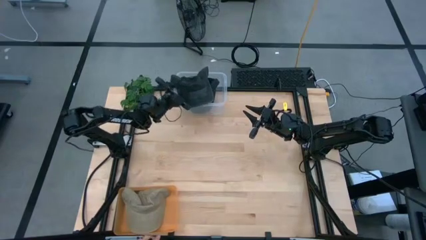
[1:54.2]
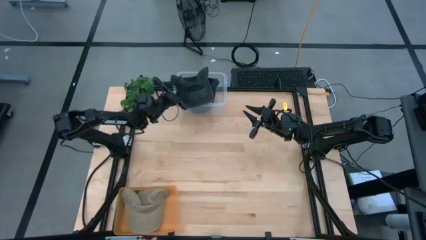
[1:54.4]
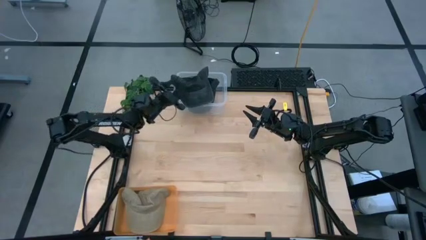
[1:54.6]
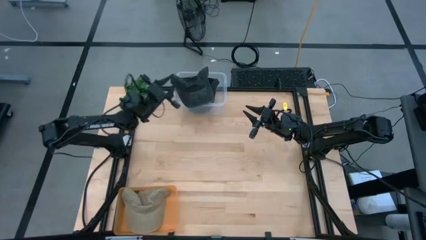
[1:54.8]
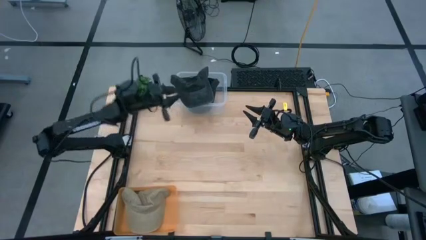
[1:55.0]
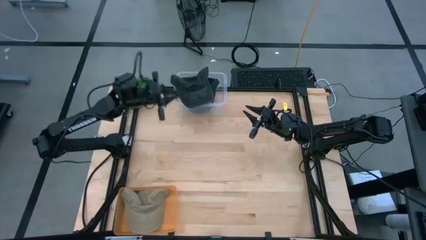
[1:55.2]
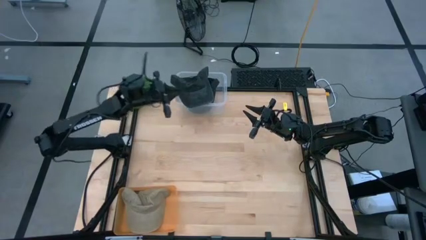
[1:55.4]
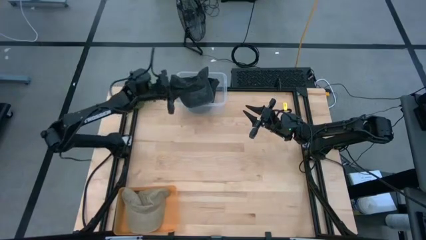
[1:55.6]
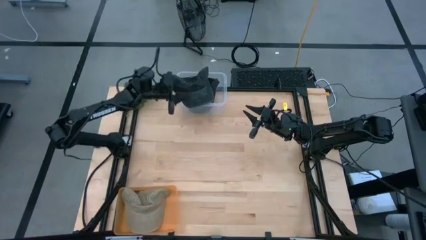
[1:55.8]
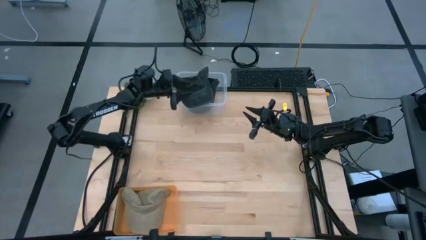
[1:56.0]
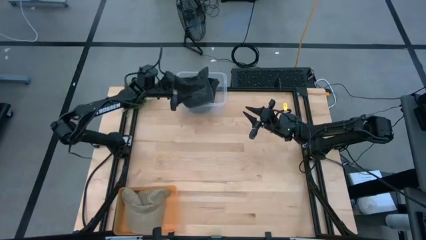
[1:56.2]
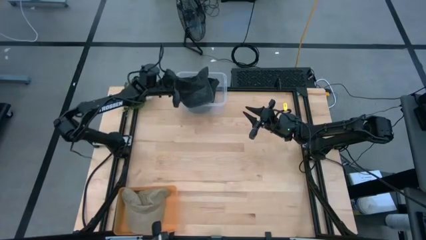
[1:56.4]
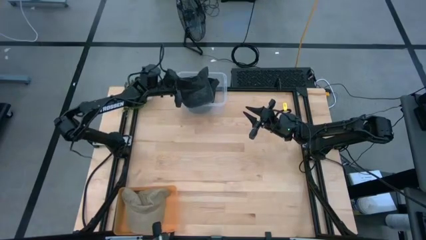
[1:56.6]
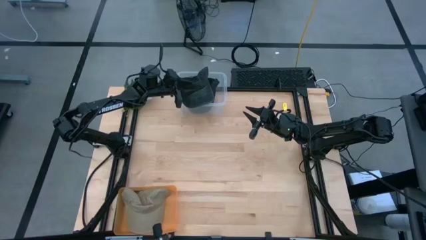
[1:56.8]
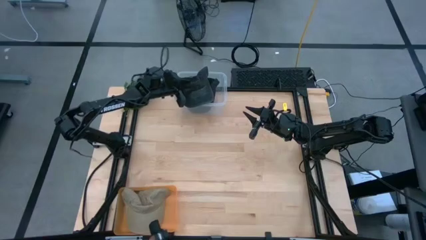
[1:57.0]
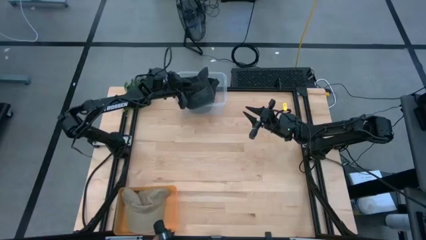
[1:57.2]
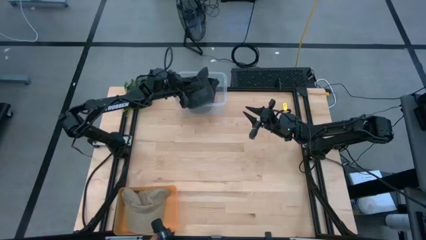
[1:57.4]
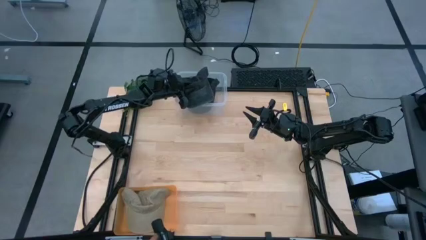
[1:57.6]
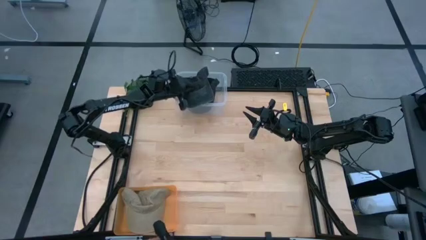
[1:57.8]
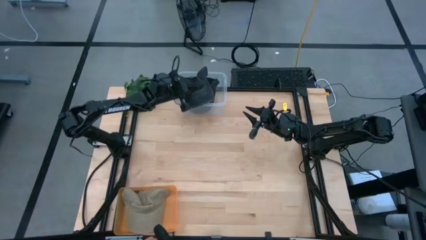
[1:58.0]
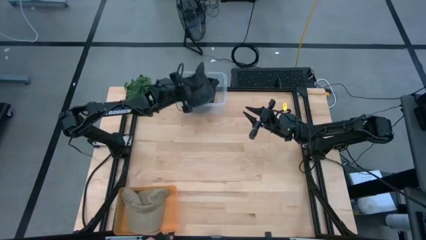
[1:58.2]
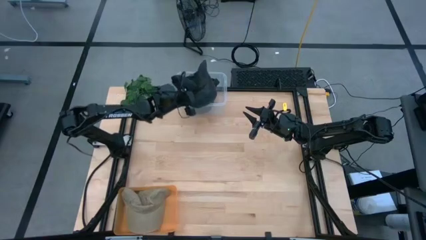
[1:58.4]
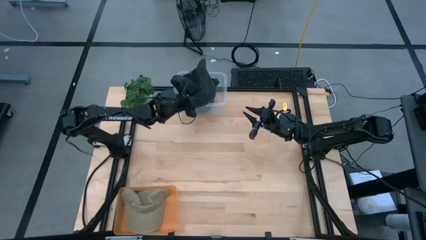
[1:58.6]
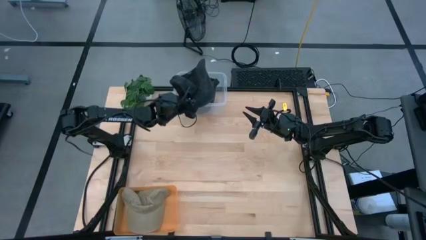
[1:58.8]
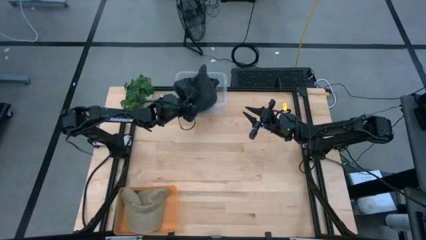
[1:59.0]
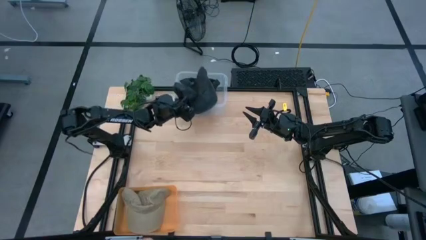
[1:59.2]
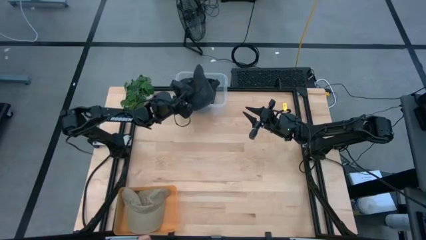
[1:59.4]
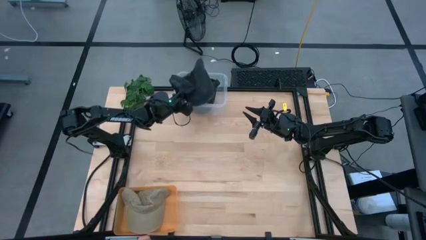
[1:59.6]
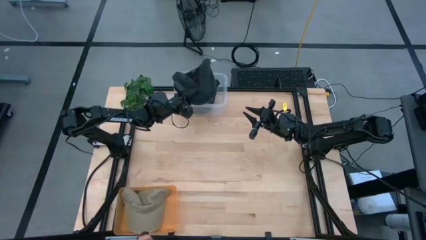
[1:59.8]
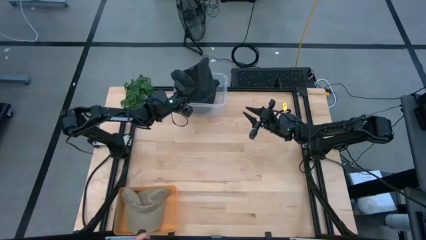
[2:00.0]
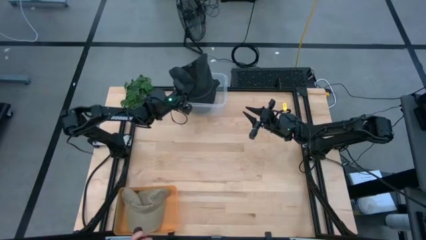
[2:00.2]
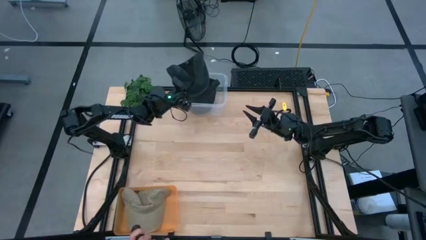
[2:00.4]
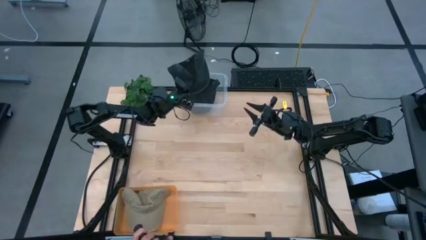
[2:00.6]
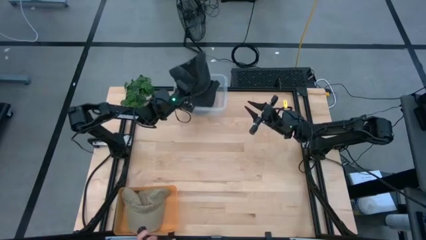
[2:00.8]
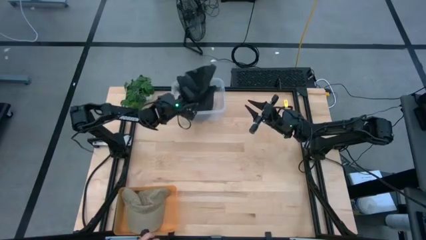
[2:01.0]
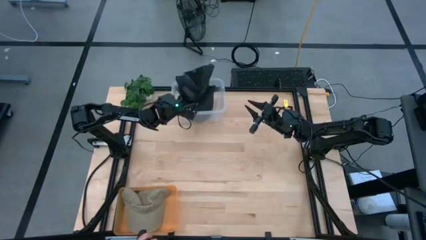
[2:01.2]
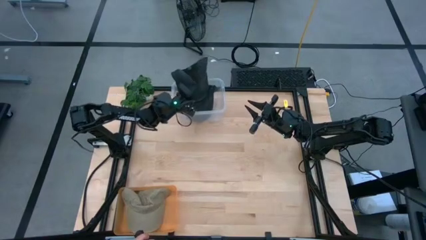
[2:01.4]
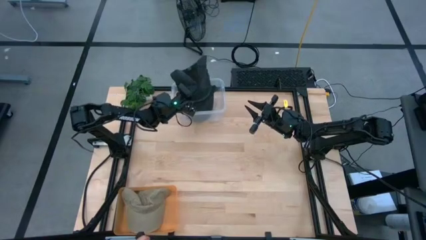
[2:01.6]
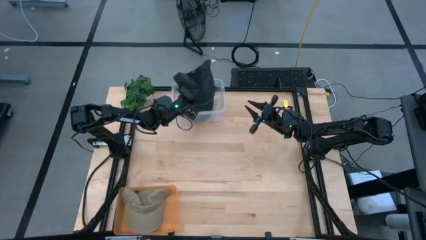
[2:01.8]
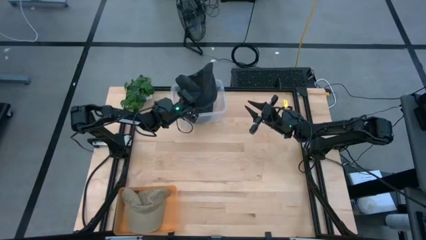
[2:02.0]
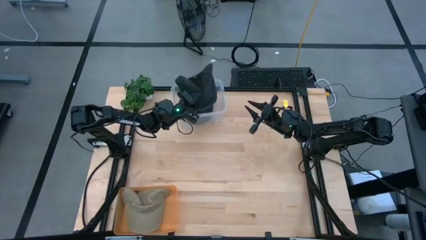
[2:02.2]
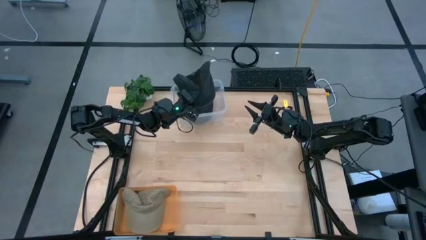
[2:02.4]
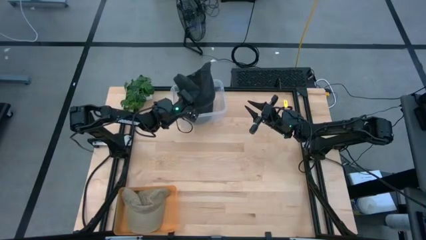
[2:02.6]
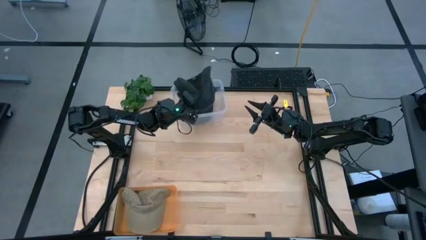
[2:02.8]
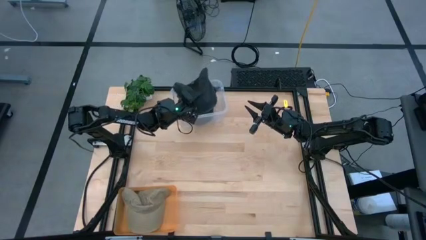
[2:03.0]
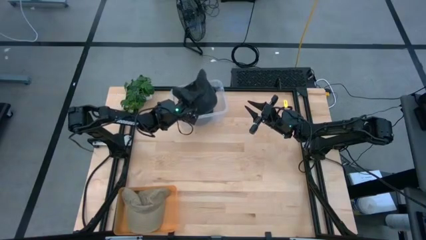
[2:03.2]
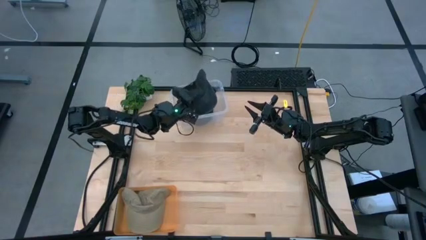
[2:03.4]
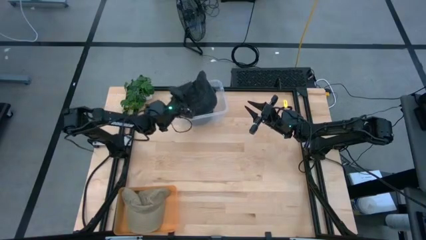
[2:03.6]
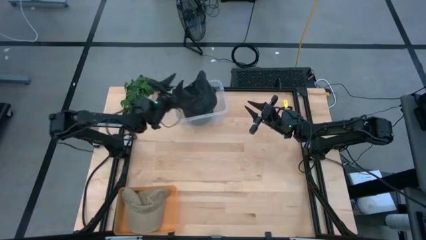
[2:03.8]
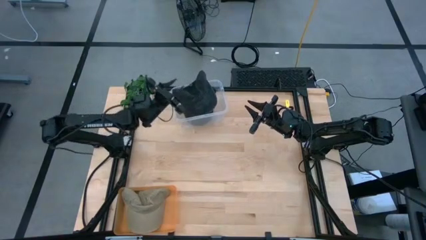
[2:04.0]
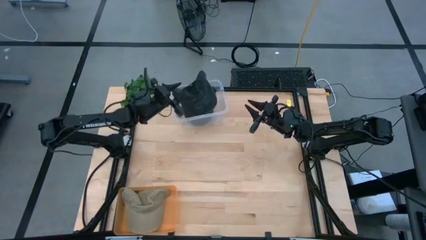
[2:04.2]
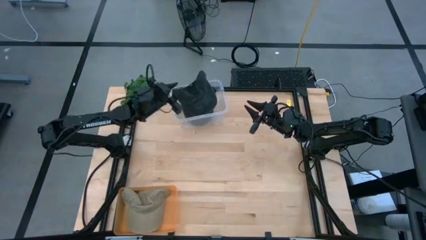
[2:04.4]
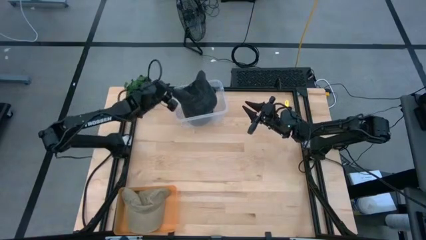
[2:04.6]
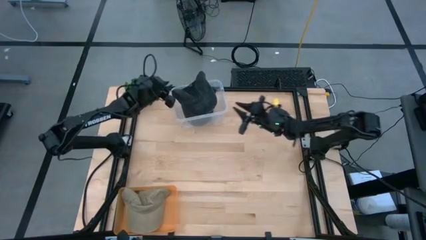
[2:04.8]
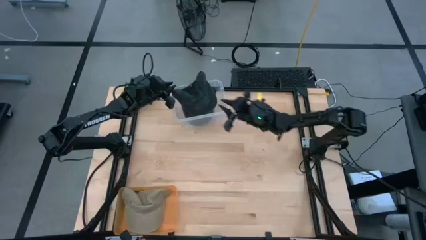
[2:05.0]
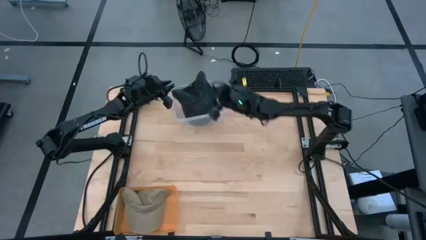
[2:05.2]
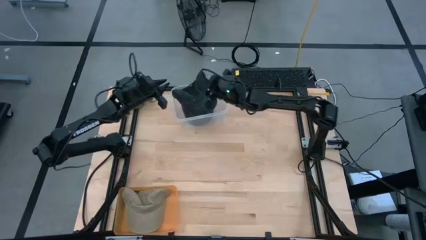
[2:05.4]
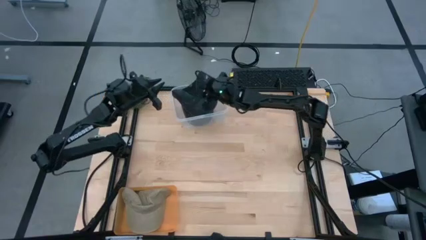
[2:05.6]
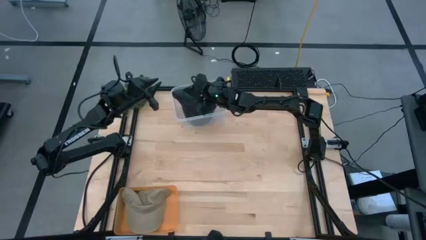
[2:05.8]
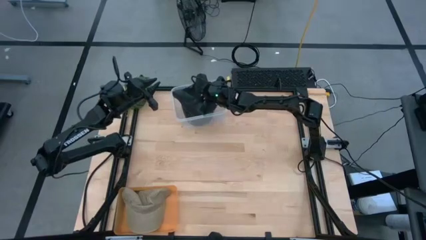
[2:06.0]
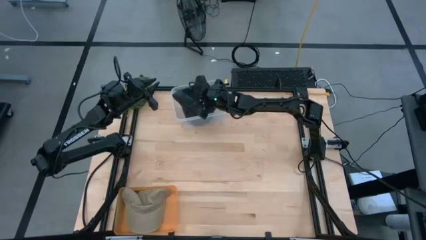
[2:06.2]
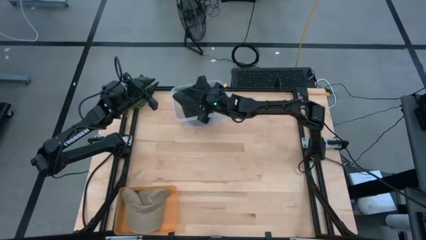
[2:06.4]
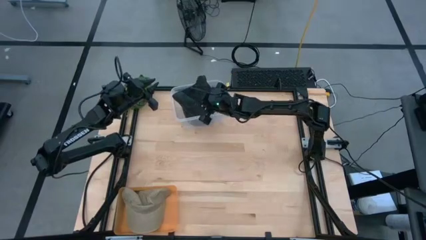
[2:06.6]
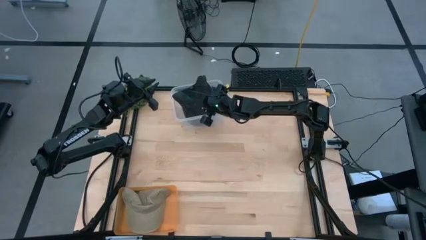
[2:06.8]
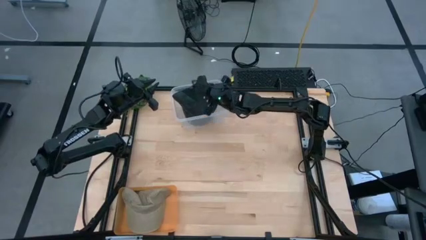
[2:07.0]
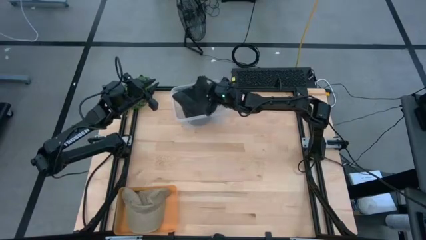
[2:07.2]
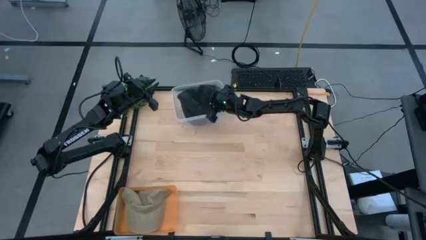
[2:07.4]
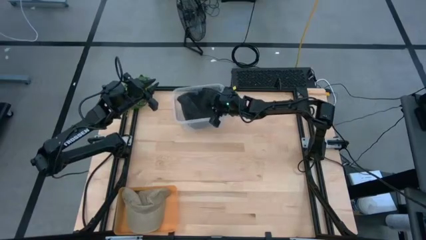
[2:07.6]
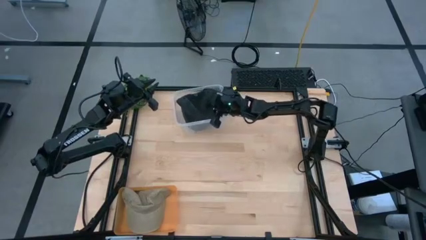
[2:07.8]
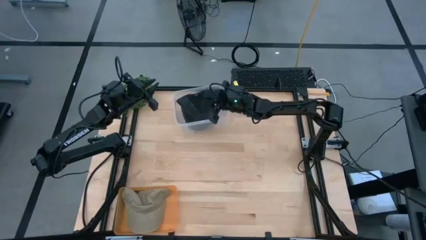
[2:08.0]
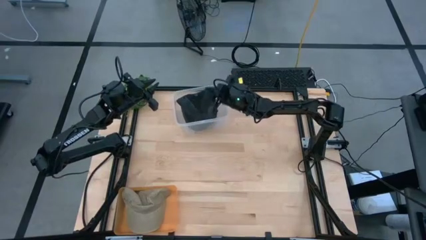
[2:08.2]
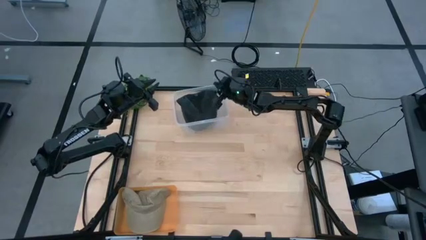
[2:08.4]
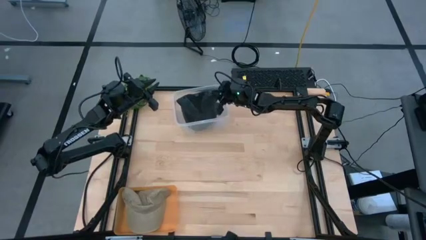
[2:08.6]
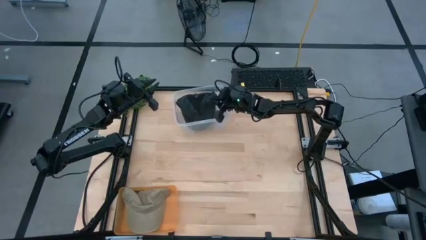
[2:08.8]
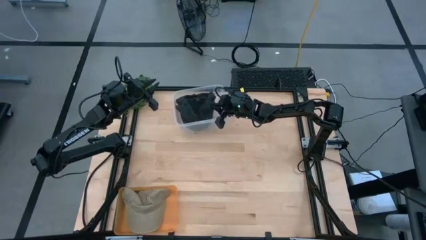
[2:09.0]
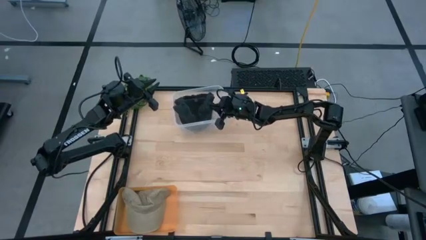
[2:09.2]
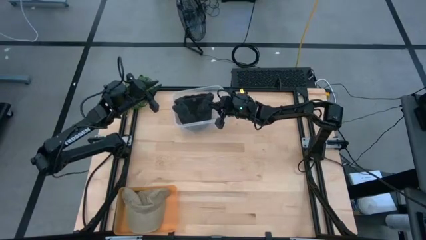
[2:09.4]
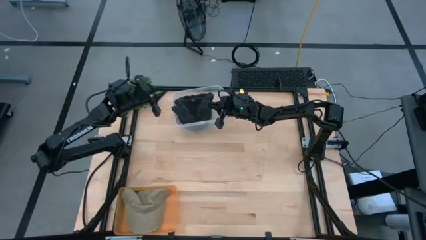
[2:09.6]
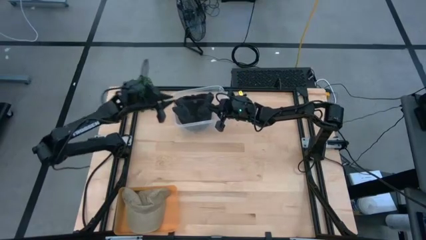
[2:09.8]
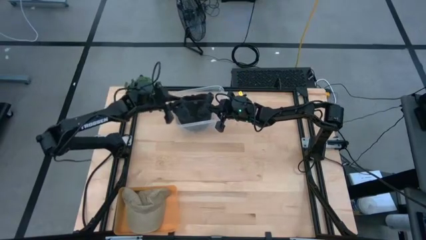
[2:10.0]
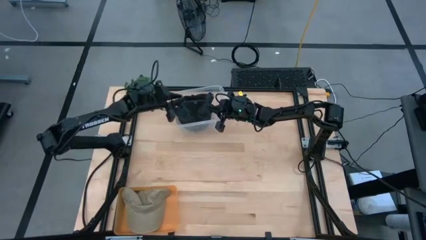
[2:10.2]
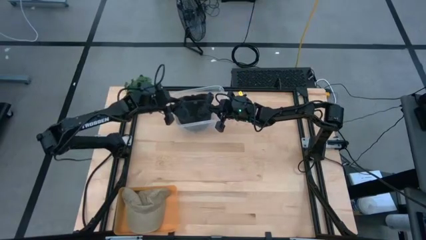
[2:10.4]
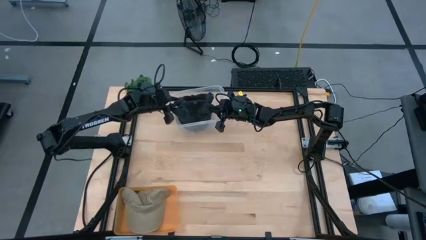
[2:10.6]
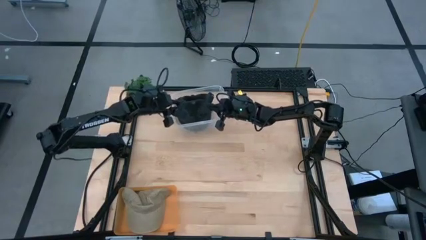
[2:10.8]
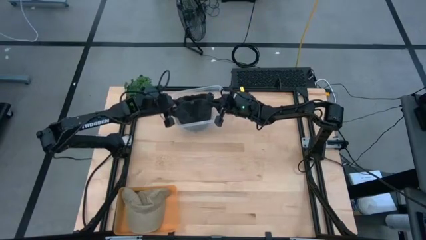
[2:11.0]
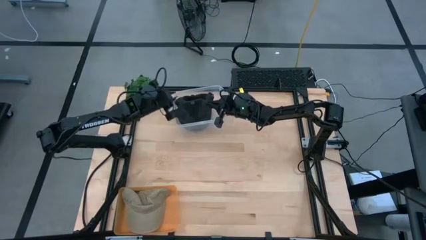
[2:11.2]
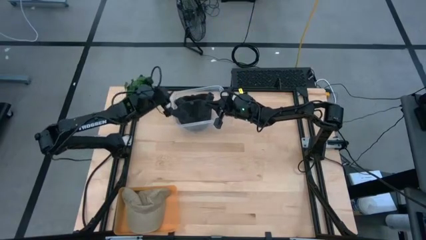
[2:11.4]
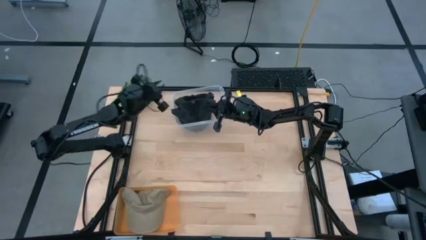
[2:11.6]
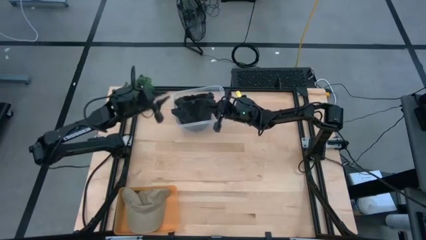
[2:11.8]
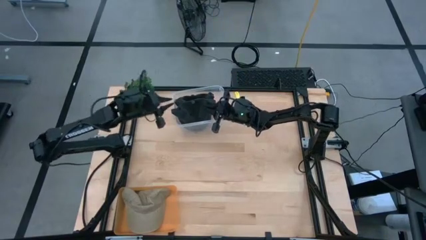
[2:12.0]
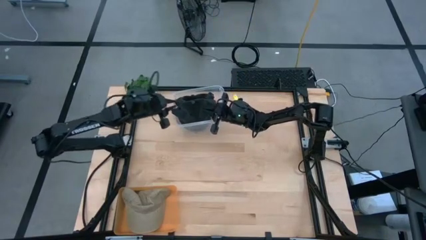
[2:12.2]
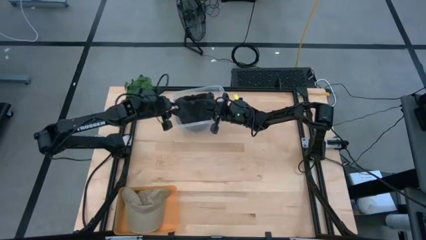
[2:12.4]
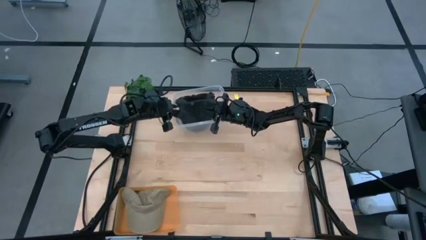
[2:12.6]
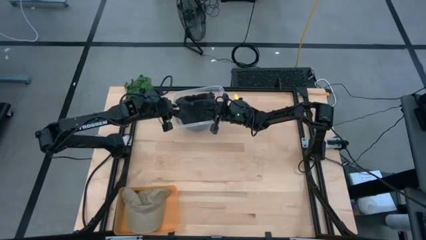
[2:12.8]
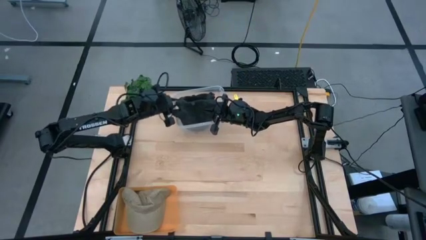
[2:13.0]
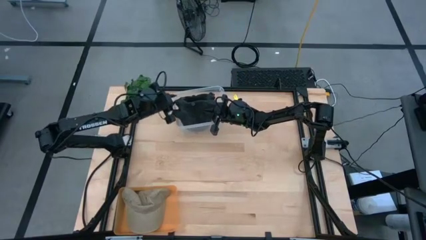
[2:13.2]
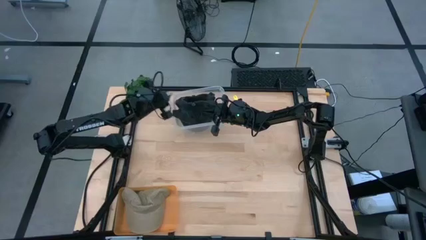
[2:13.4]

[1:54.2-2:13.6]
Task: Pick & Place hat
Put the black cap into the transparent bin
